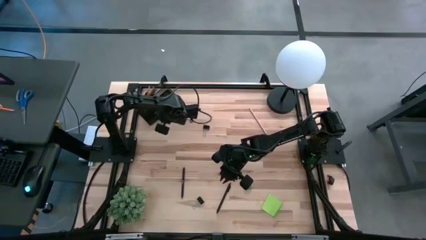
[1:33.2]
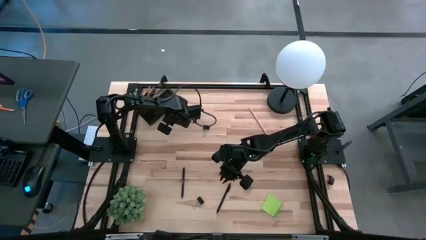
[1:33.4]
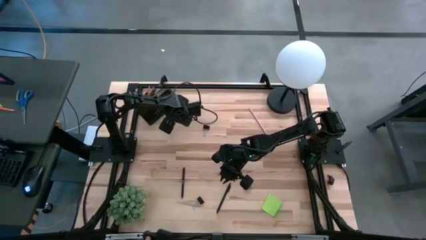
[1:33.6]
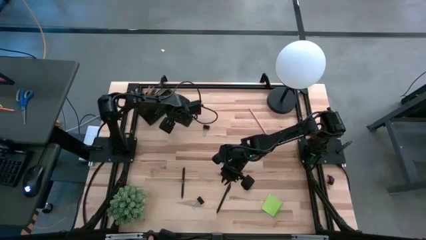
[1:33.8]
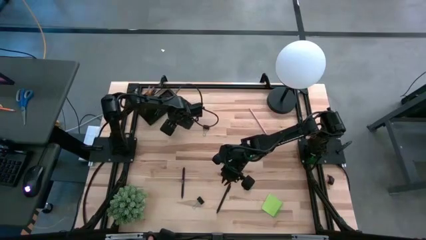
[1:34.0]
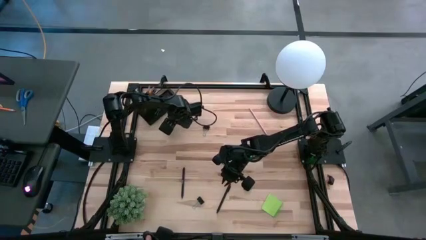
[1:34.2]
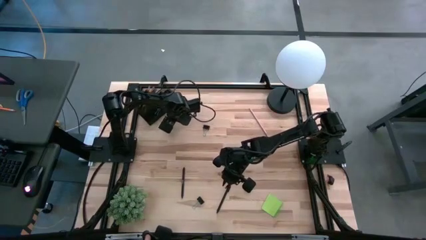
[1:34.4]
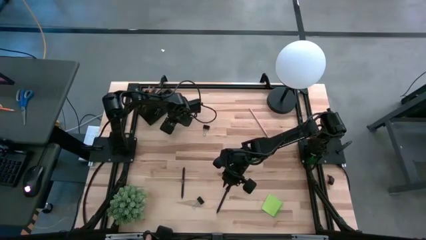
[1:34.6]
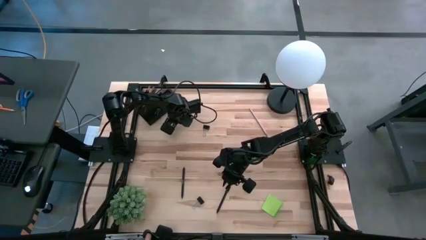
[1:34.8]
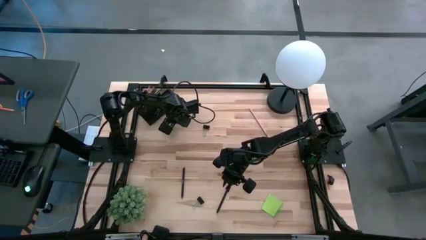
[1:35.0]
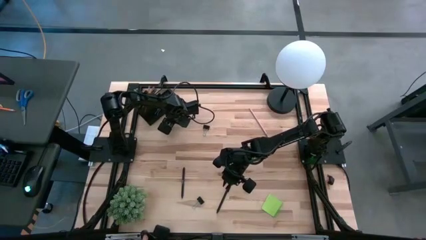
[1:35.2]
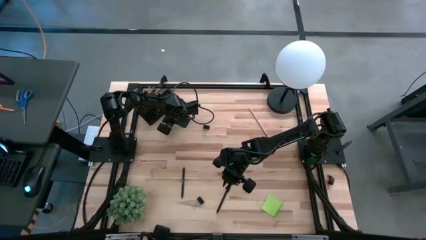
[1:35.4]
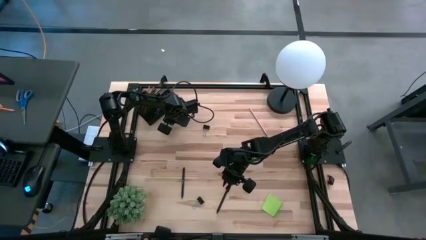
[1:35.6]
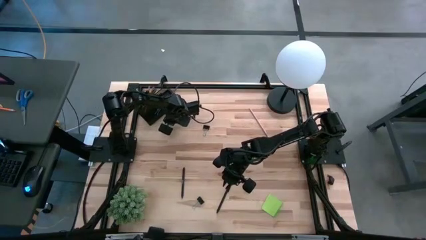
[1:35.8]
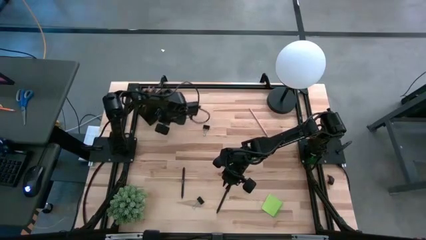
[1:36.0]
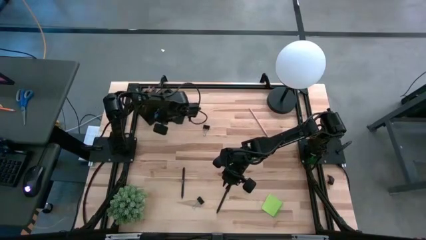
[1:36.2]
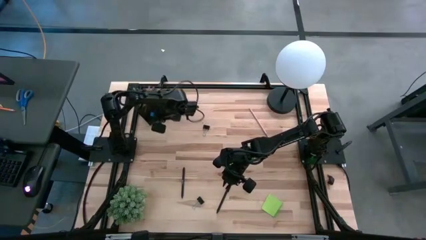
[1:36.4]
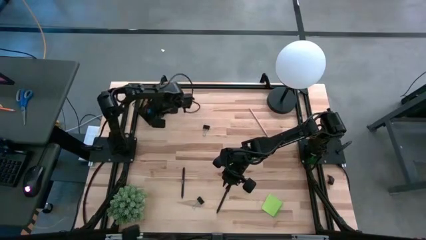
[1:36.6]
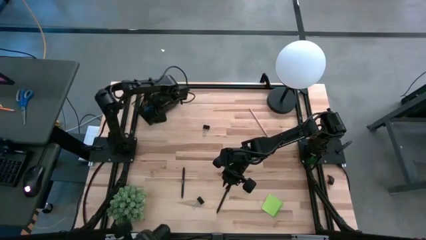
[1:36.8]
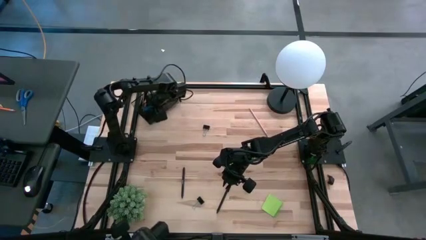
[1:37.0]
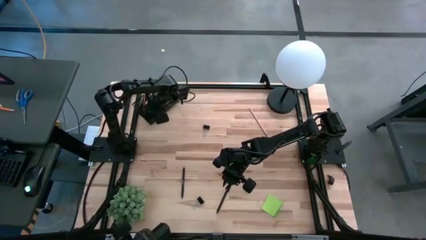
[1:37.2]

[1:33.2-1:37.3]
Task: Pick and place office supplies into organizer
Put the blue eraser into the black desk organizer

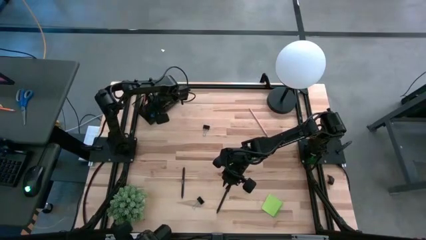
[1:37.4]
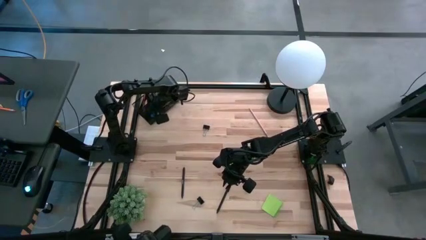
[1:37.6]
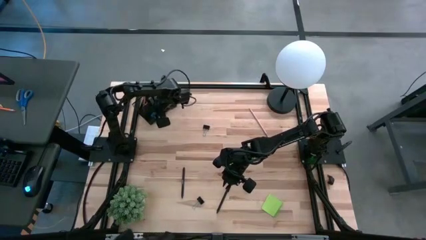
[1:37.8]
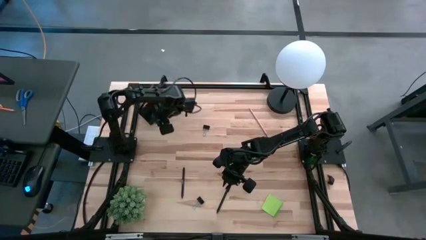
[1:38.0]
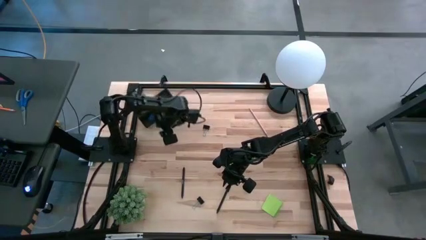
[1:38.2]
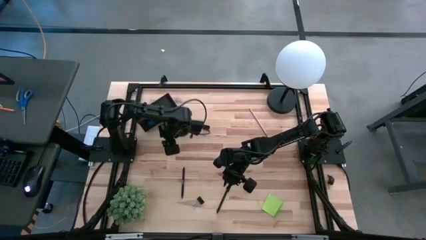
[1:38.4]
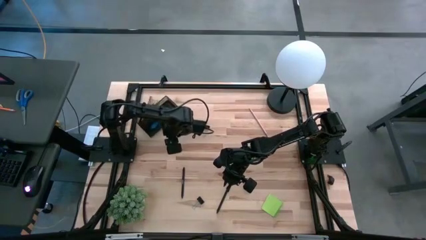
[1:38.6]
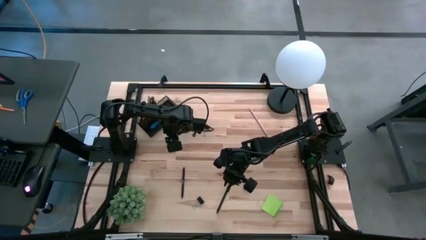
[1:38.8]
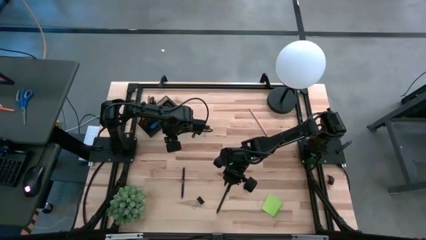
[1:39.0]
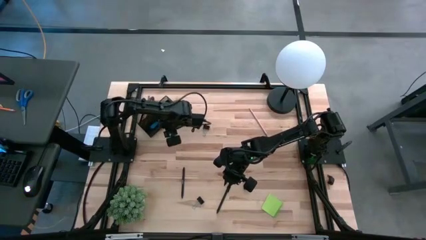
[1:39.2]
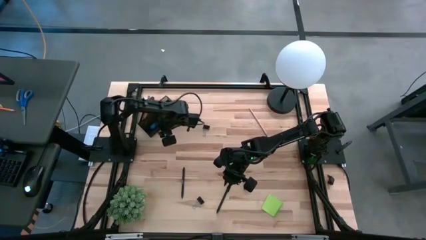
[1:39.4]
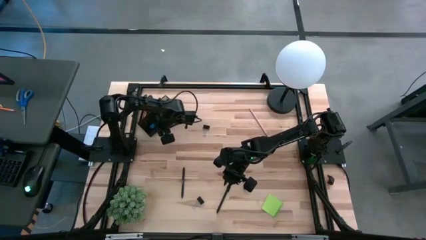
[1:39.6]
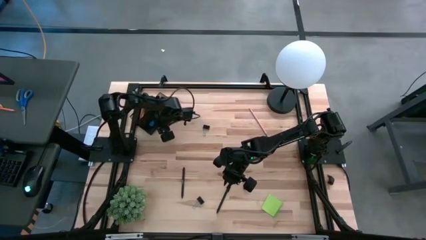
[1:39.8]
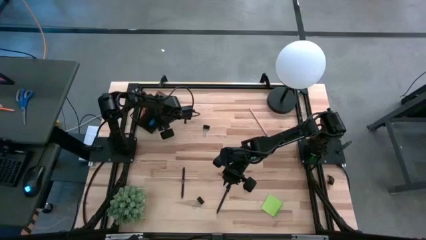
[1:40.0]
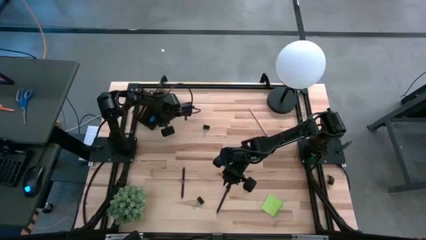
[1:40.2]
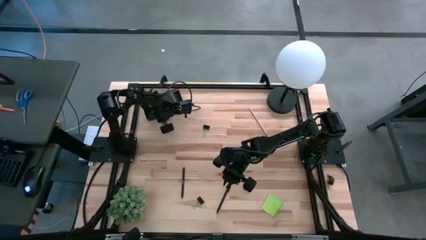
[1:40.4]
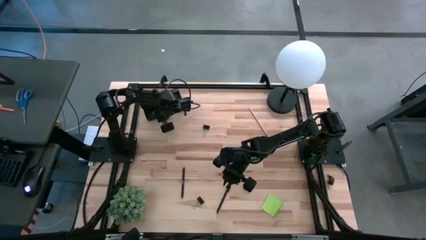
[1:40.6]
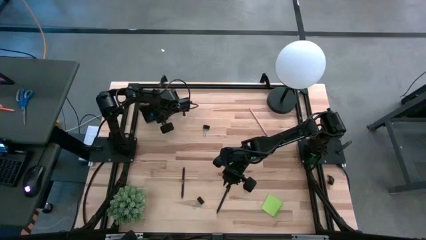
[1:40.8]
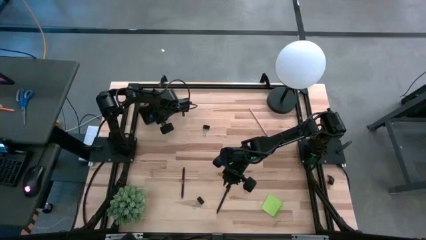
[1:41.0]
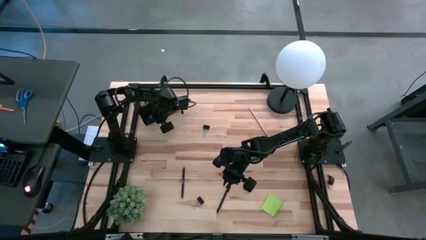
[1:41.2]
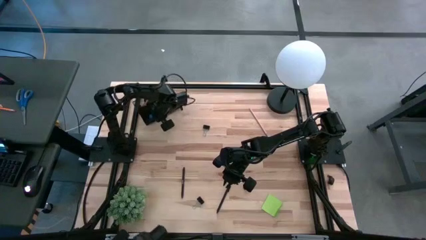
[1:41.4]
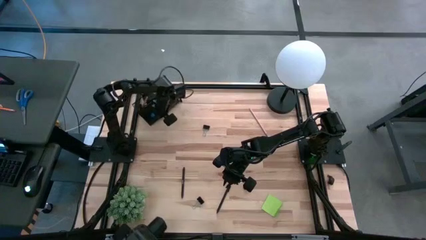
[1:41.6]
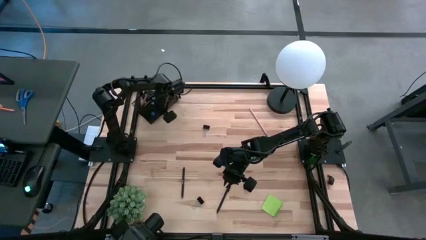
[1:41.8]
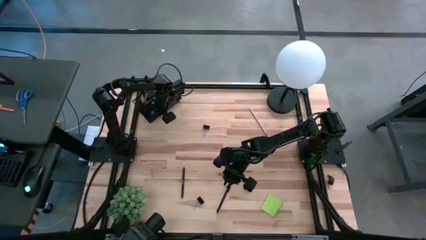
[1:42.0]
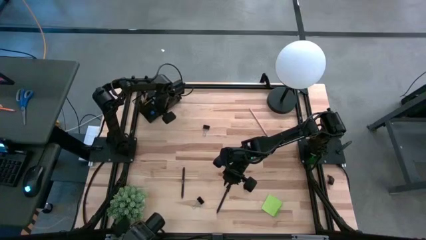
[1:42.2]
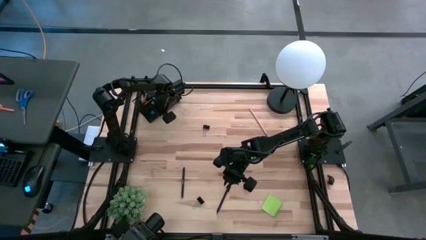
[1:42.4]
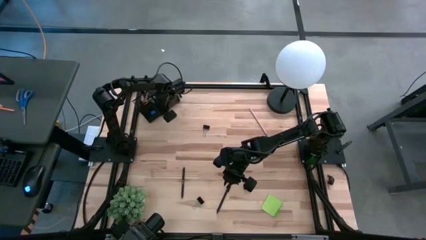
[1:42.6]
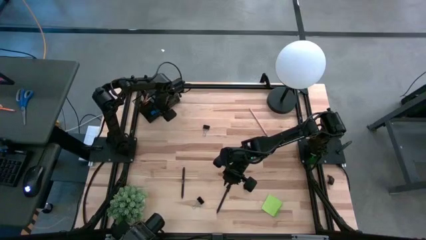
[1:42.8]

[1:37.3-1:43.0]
Adjust the black desk organizer

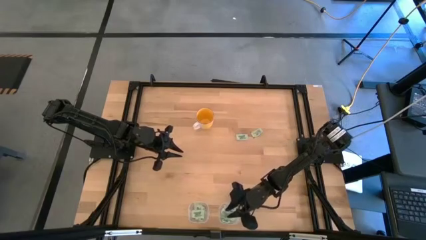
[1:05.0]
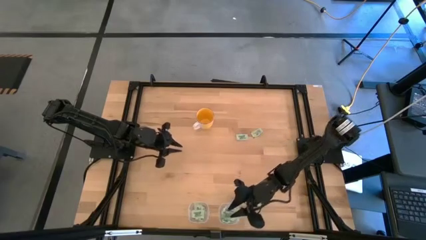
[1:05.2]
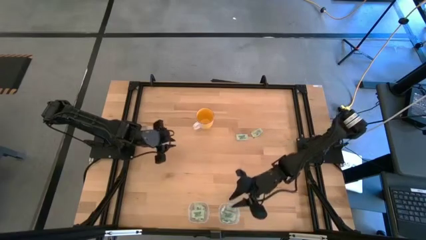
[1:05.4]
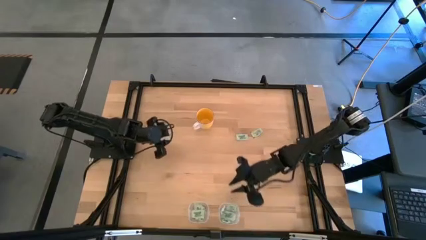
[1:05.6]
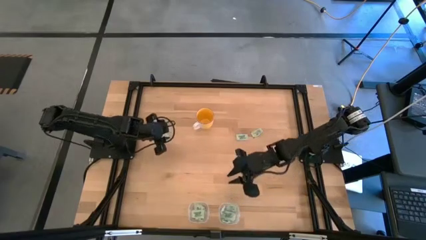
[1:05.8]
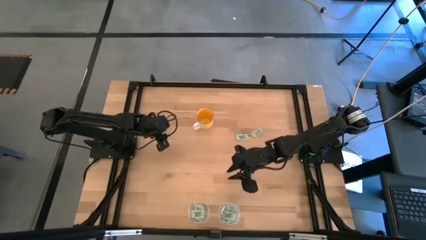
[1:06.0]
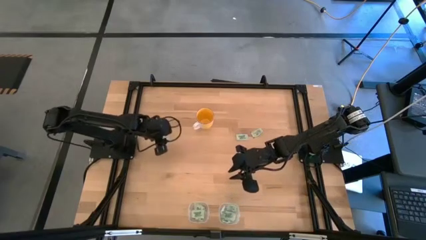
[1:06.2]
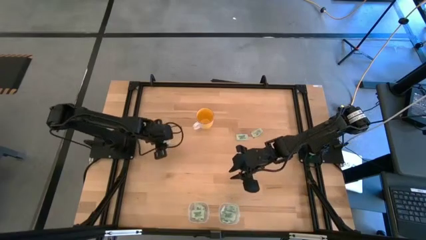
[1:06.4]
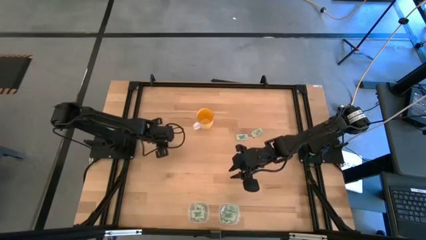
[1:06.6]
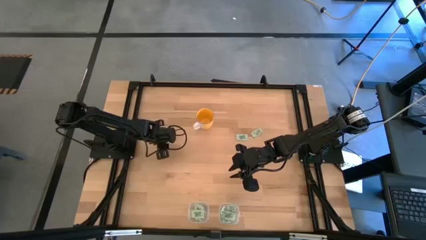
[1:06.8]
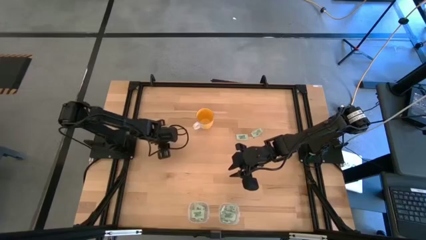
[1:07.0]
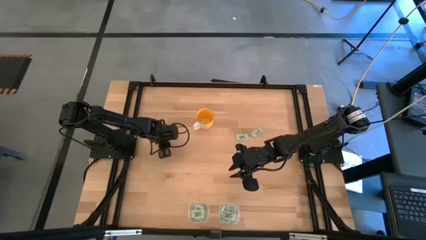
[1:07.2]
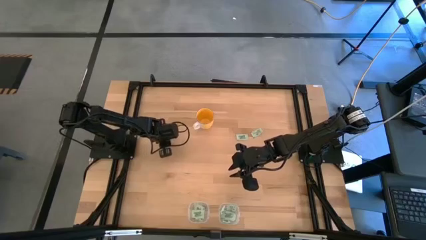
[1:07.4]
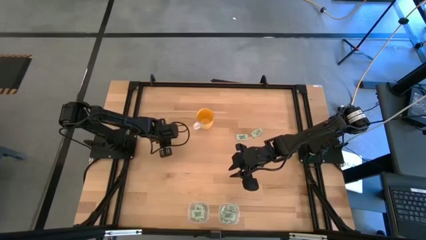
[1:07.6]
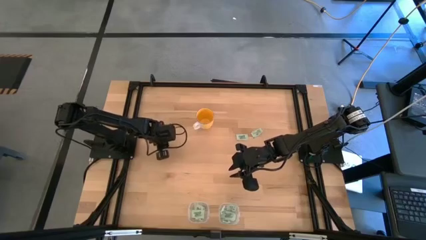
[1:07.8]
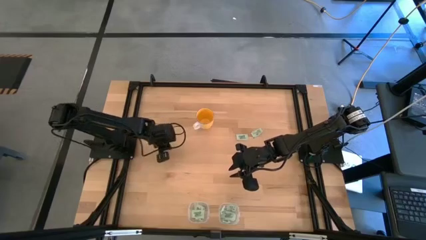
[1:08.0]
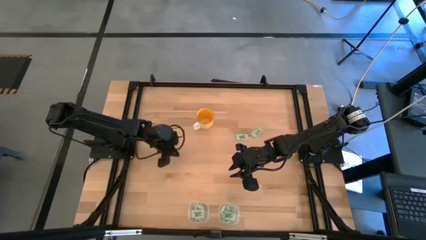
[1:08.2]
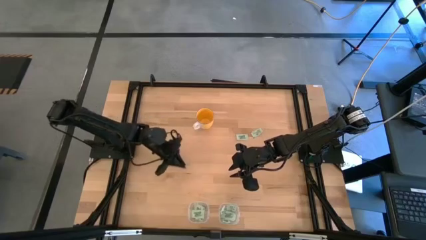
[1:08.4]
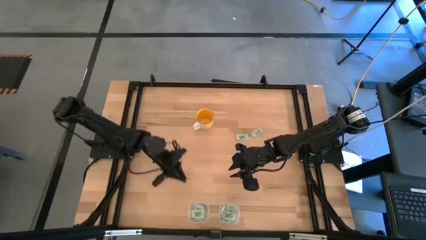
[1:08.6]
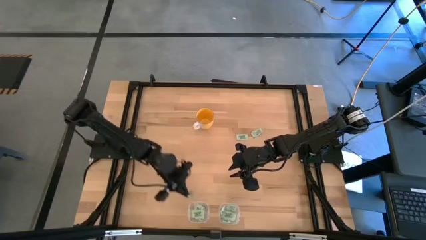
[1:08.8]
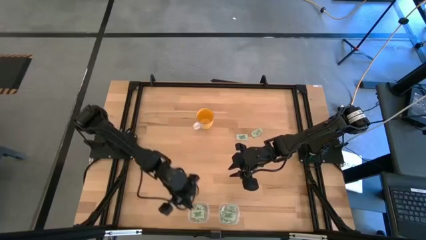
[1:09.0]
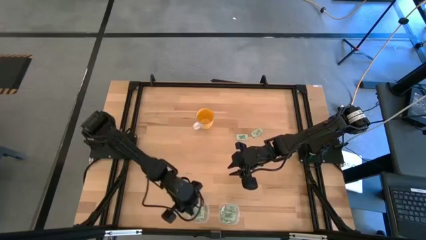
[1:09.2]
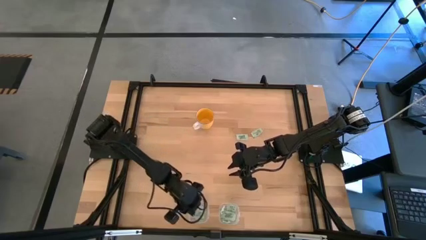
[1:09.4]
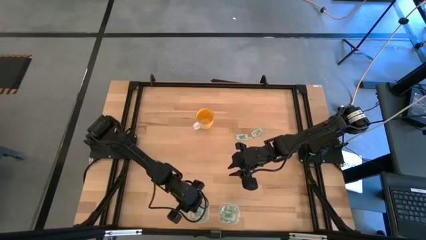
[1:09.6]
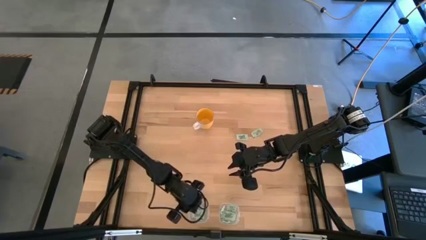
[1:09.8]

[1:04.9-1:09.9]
Task: Pick and place items into bin
Put the green stevia packet into the left transparent bin

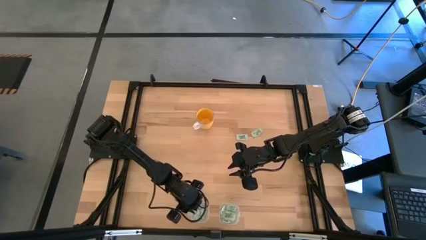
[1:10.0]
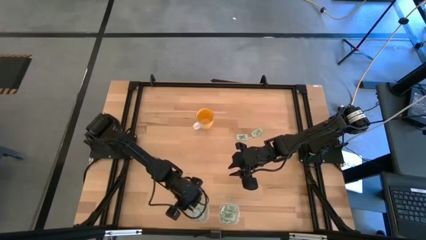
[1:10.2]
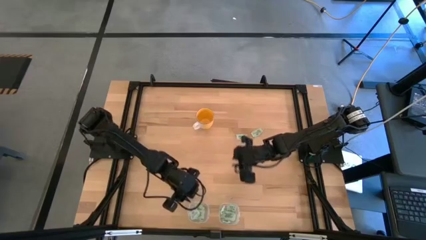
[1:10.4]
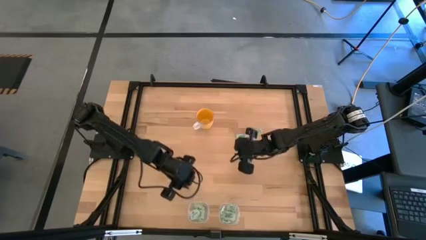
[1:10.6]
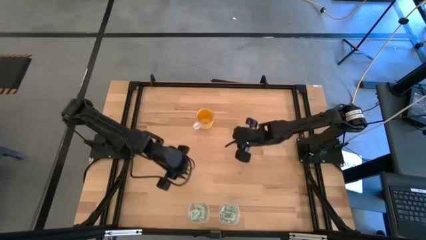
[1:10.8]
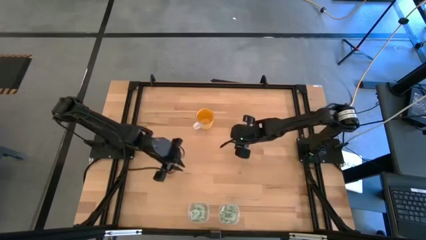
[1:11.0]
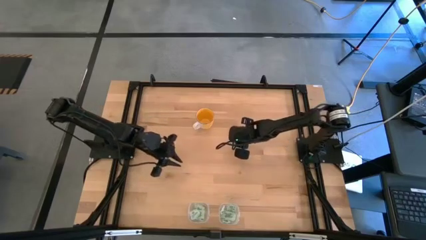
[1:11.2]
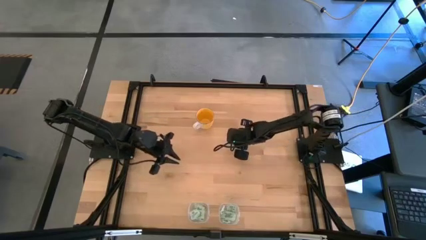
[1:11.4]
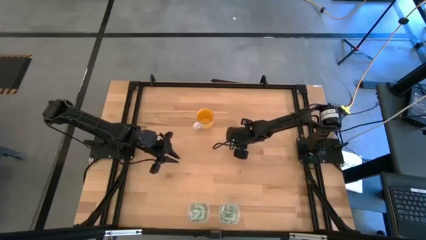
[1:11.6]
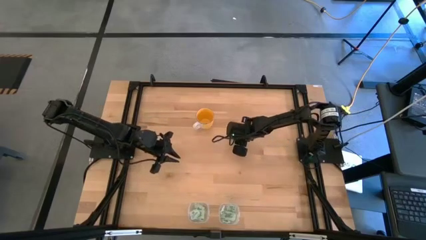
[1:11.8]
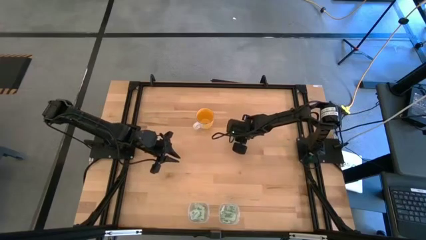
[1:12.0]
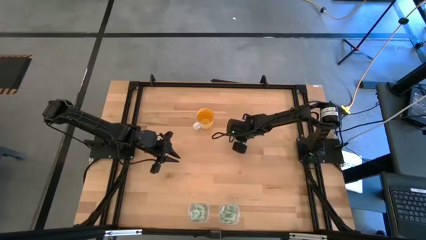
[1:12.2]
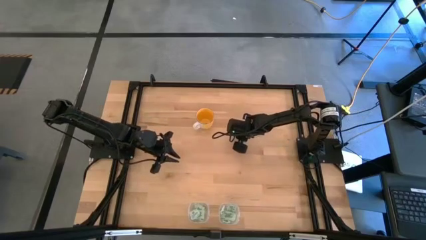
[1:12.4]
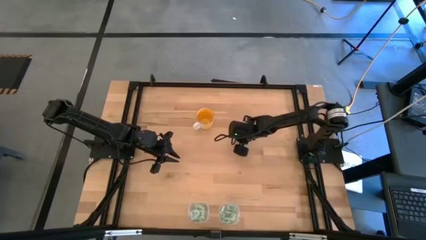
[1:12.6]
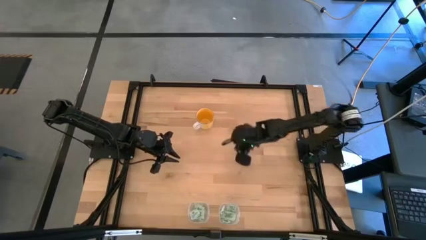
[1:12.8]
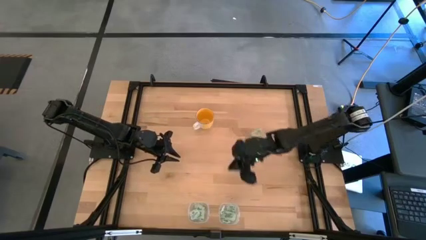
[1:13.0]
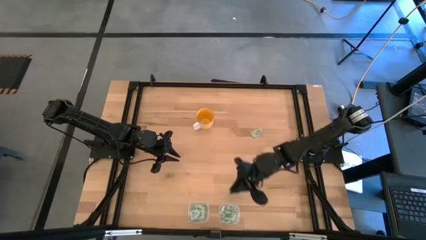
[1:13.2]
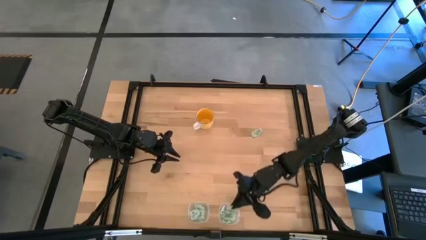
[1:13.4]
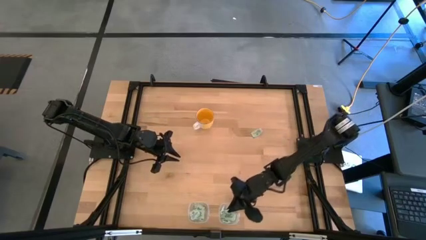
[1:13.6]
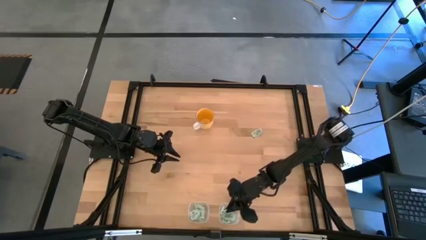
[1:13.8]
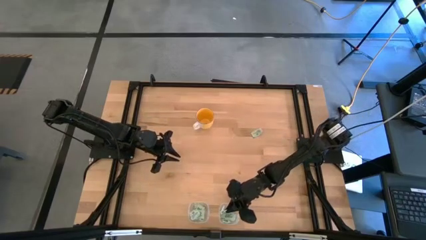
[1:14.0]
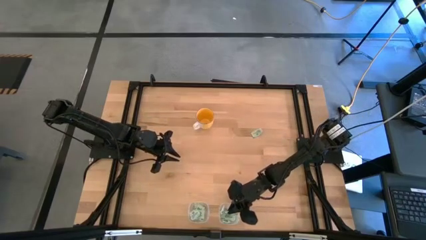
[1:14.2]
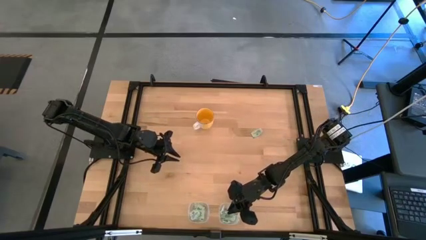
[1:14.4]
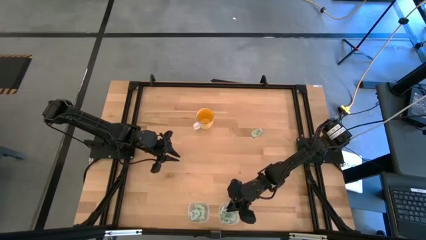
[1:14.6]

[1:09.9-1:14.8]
Put the green stevia packet into the right transparent bin
